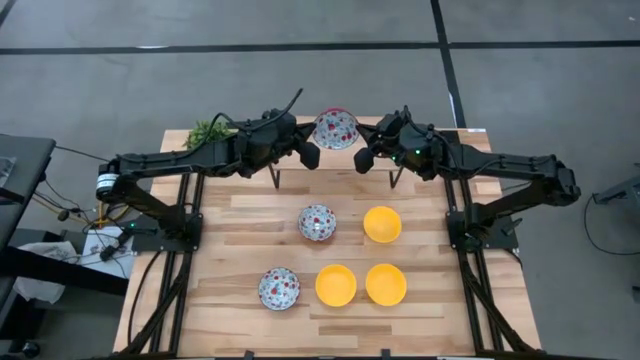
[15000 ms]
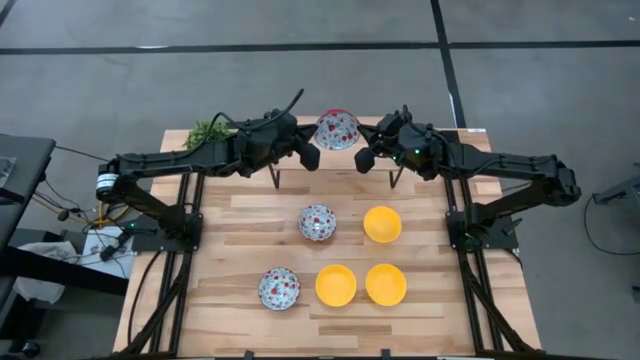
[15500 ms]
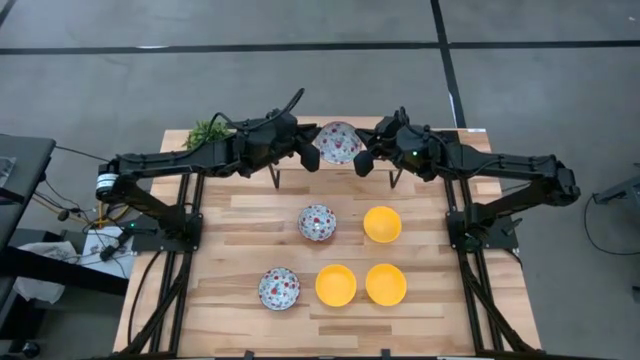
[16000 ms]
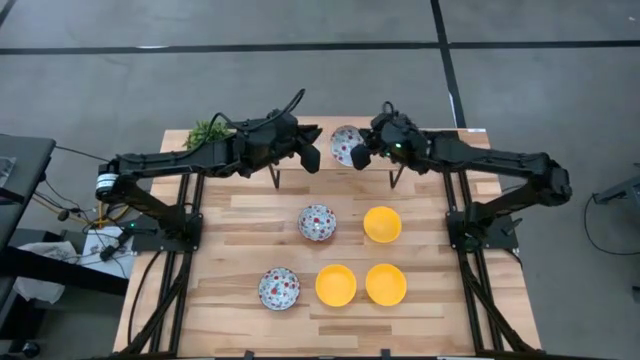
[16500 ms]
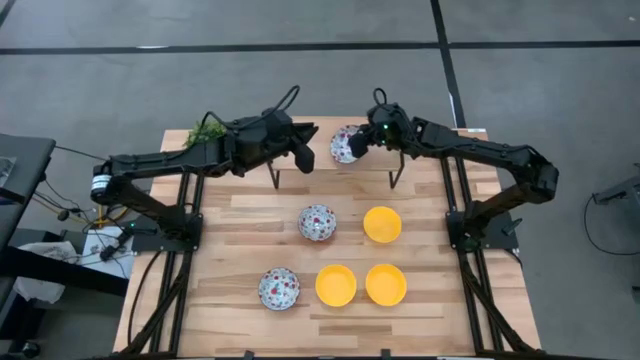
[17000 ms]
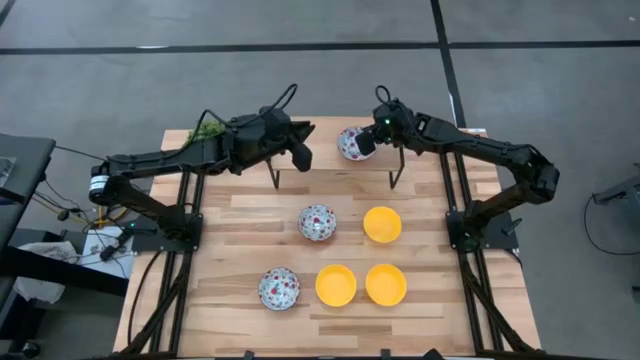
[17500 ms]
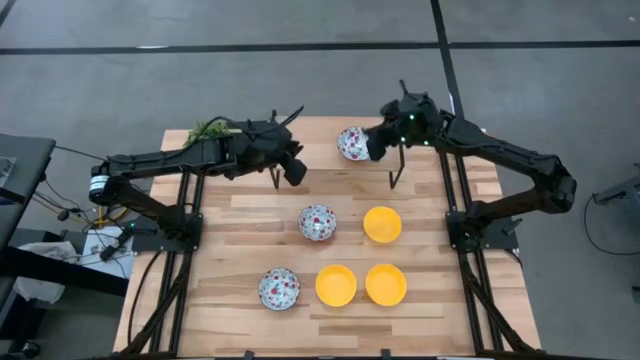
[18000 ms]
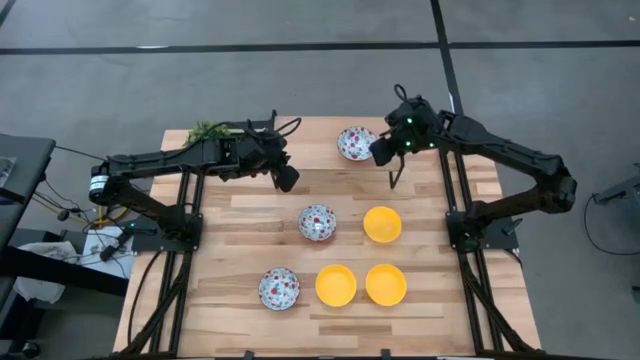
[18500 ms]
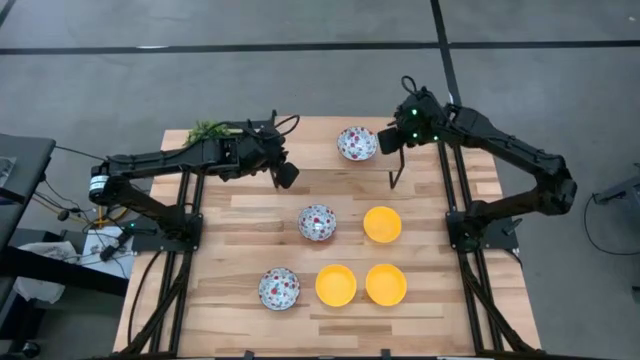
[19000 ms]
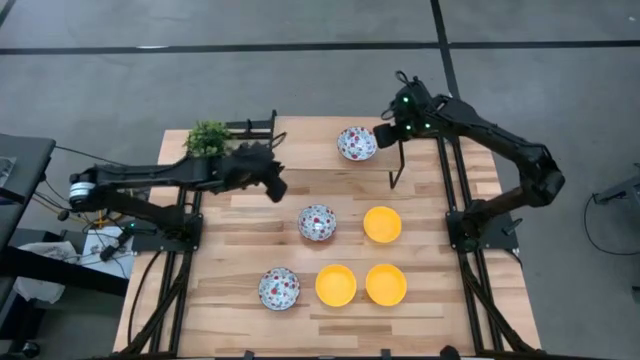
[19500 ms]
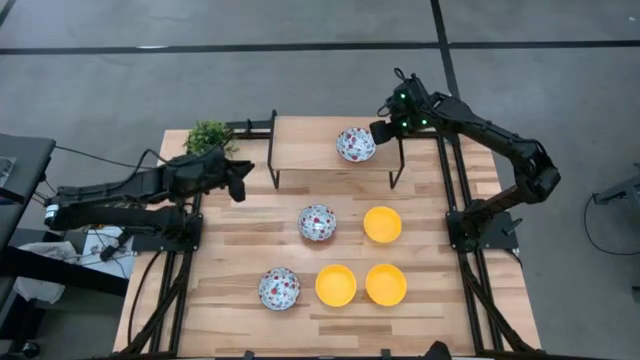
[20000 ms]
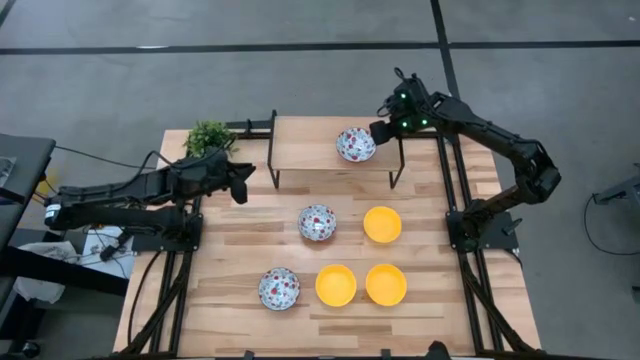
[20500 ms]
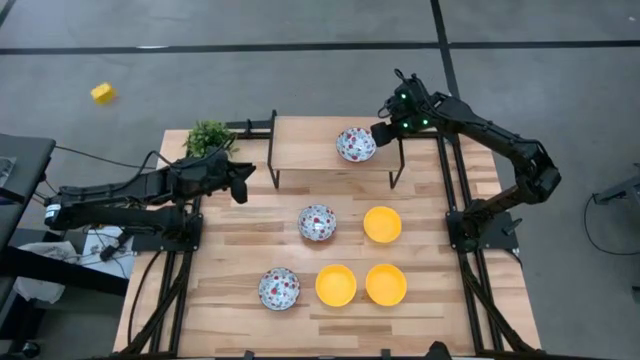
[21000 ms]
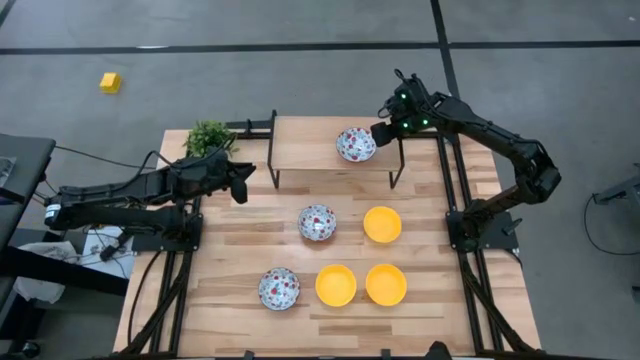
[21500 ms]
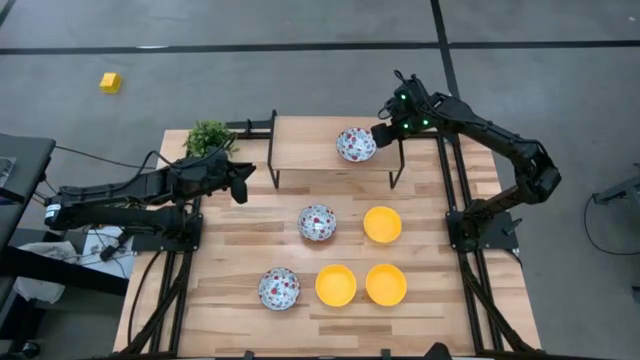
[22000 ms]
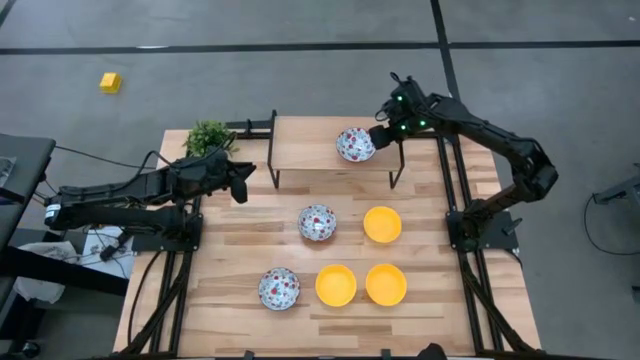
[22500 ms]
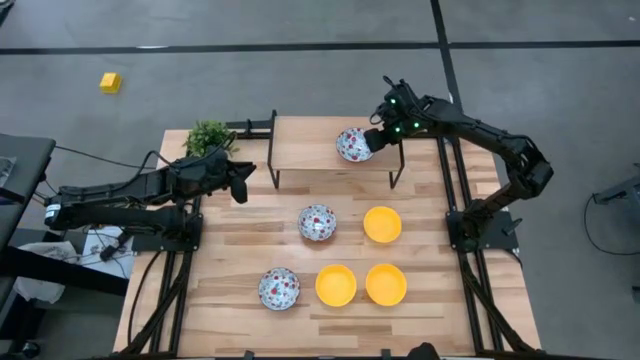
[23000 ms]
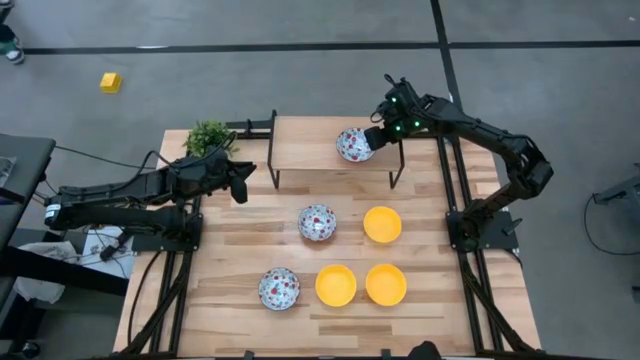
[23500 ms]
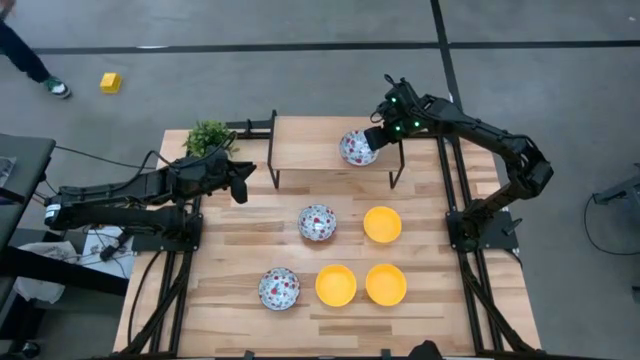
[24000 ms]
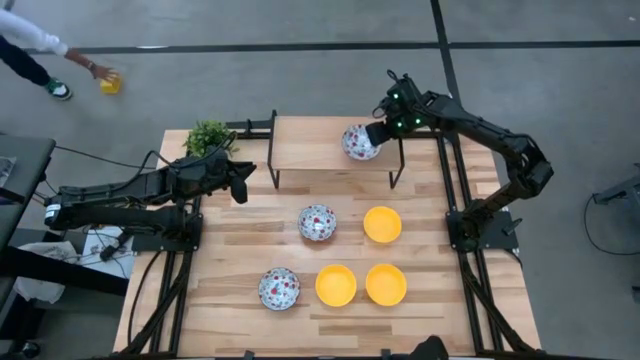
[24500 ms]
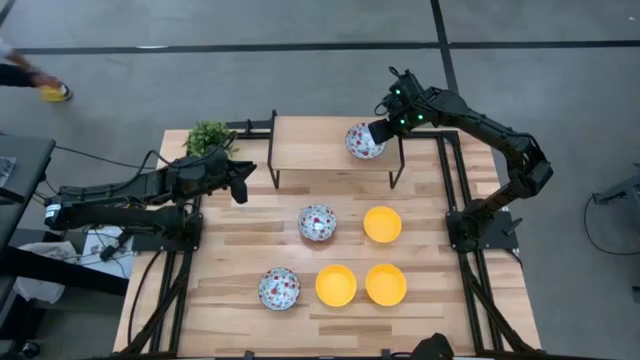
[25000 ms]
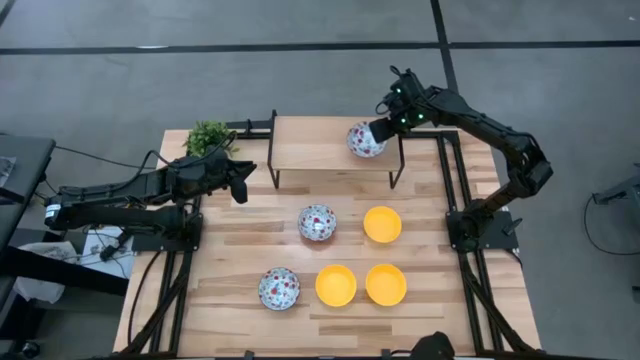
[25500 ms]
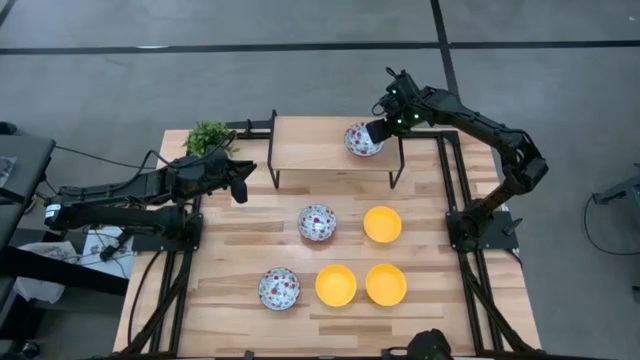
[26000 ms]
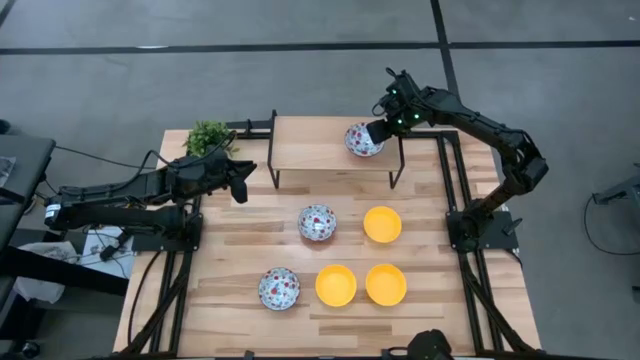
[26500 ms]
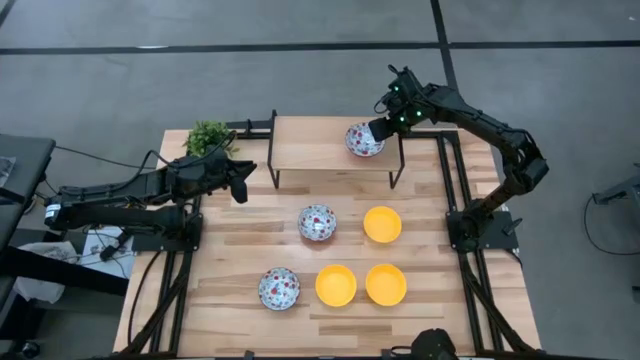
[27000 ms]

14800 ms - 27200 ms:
Task: Pick & Place Mini bowls
Put the top left white bowl on the shelf

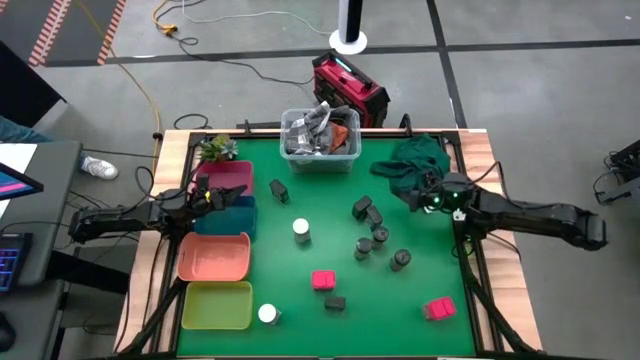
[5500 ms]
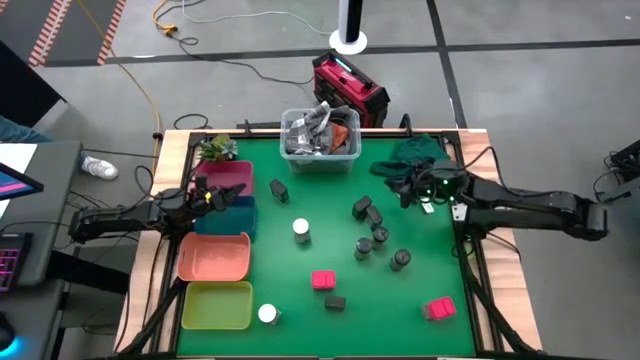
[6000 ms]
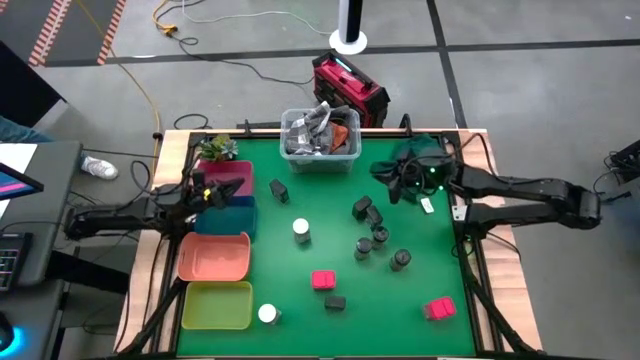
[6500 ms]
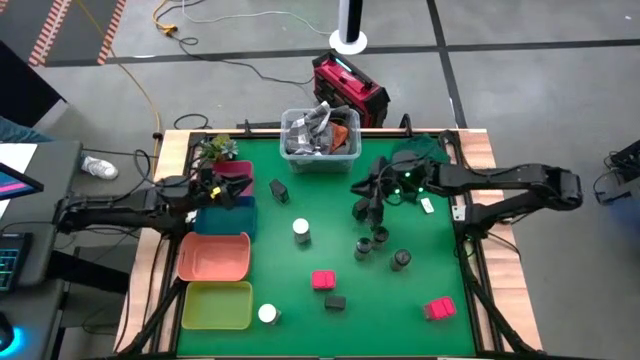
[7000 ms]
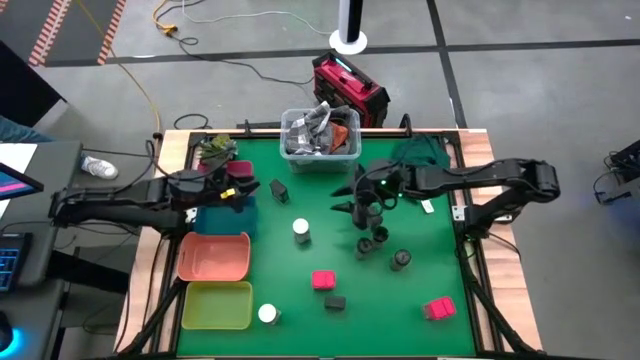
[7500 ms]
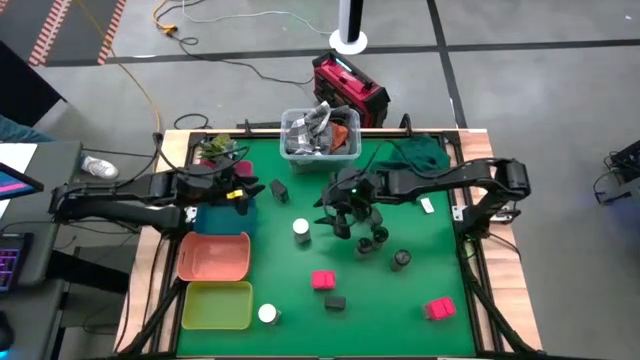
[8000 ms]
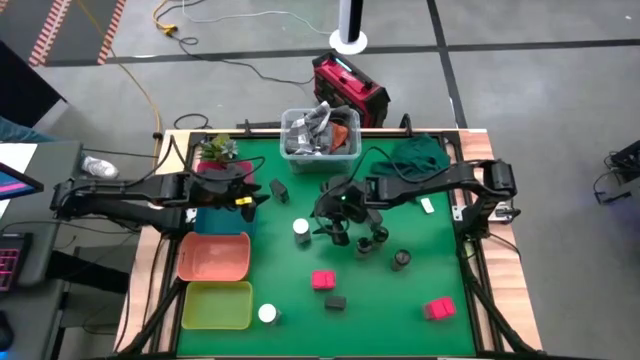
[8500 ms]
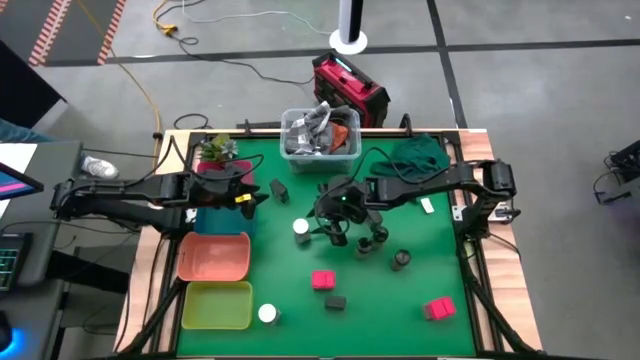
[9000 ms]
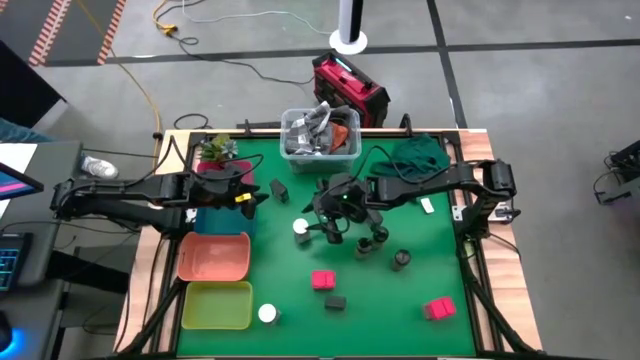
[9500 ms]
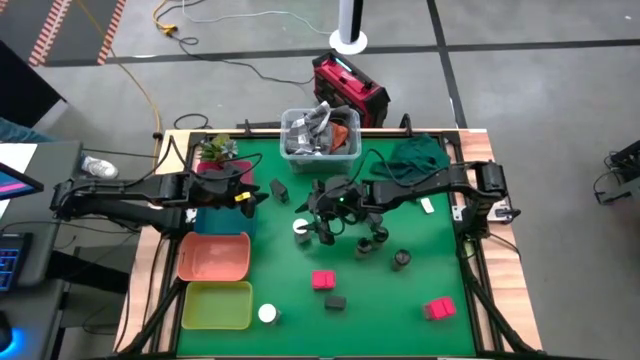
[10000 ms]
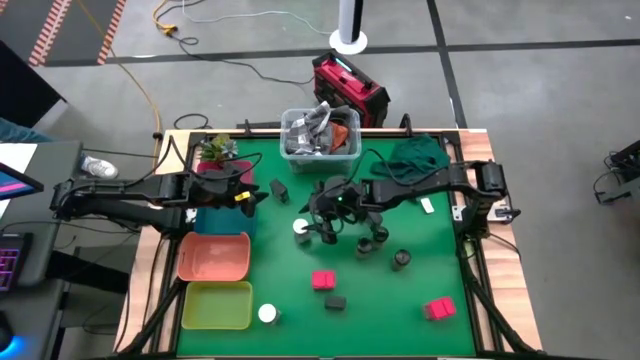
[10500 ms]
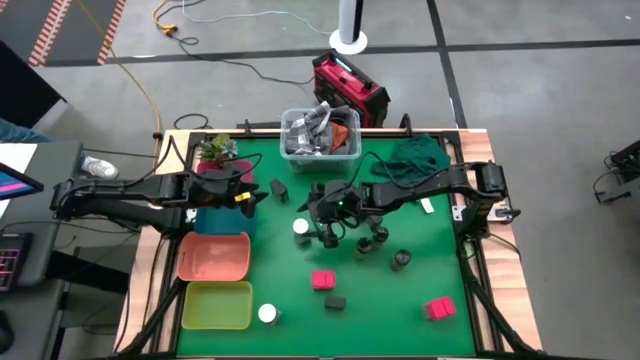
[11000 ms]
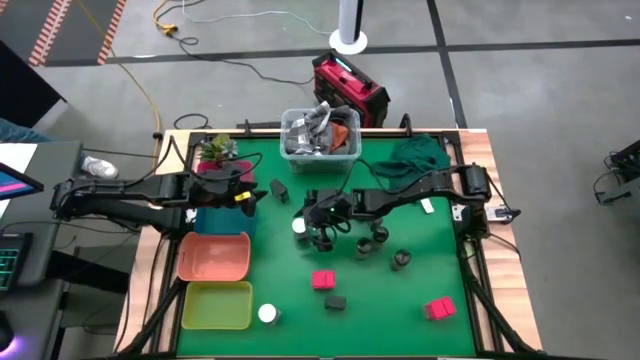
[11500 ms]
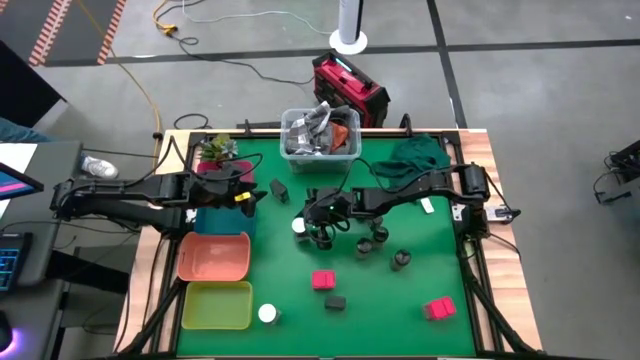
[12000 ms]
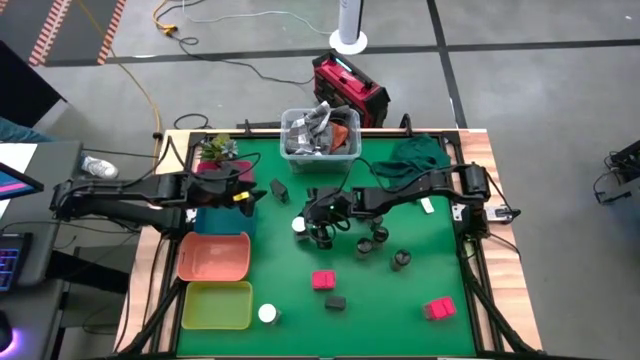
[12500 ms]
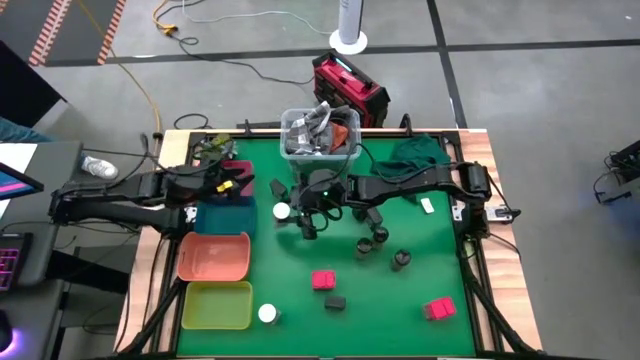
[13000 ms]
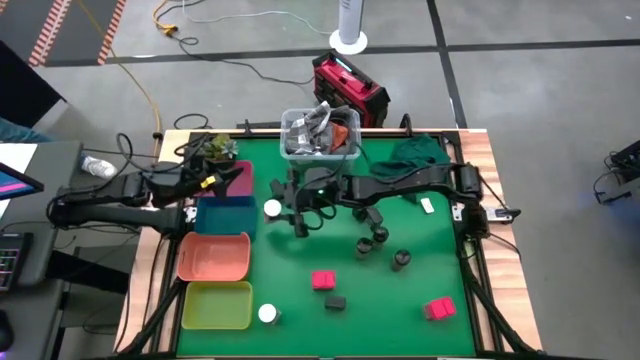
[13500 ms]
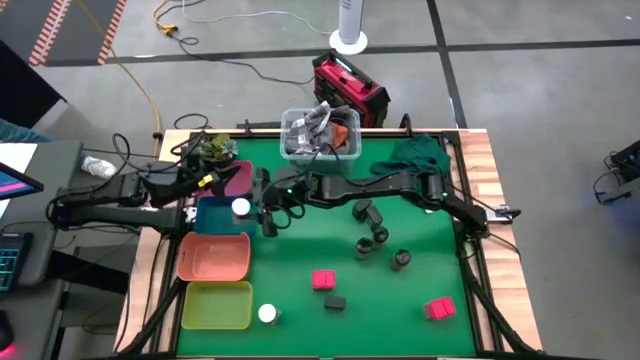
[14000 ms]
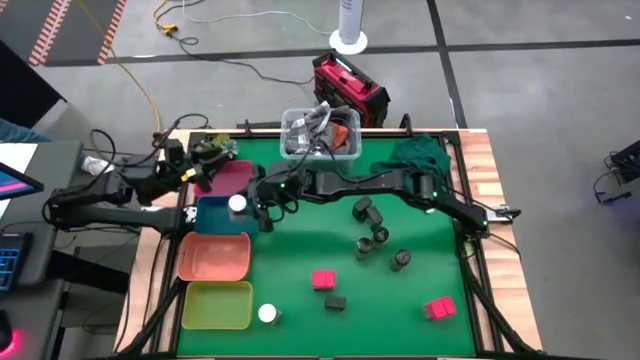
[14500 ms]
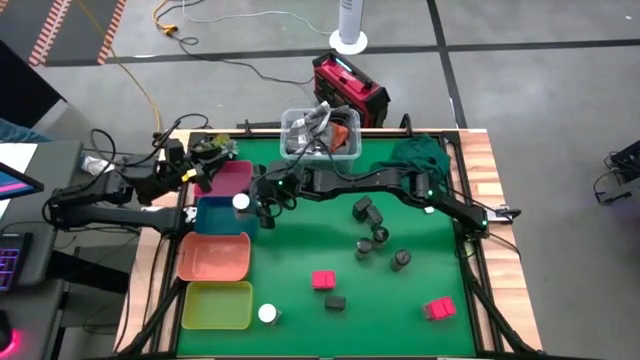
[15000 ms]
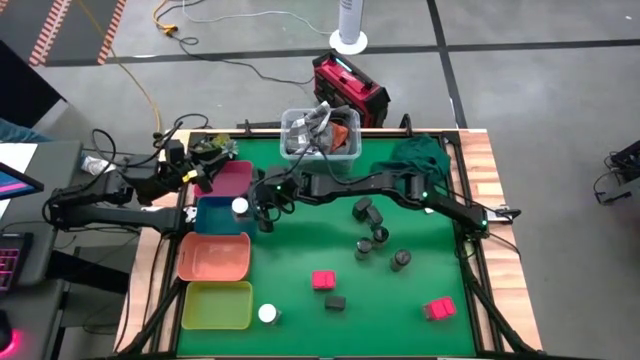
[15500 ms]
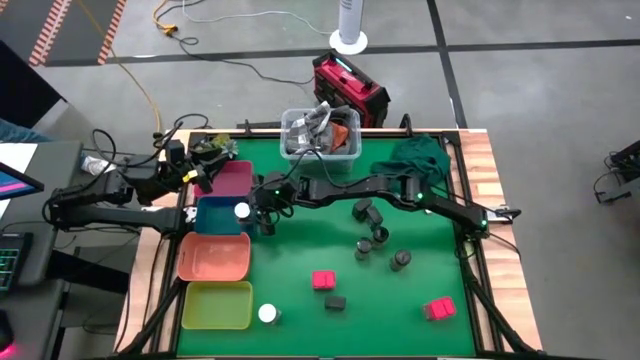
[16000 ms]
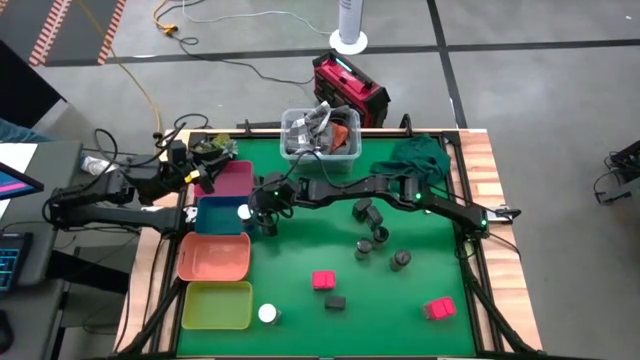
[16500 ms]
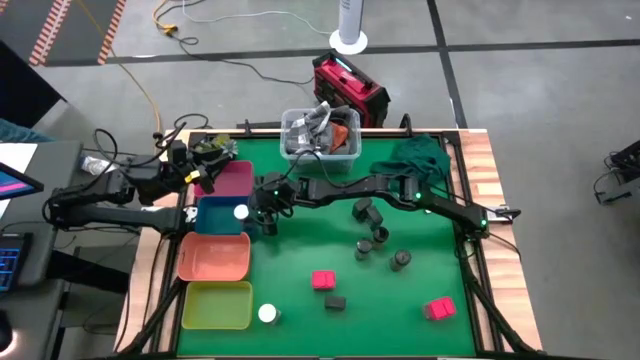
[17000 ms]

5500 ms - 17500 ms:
Task: Sort spices by type
Put the top white seasoning bottle into the blue bin
